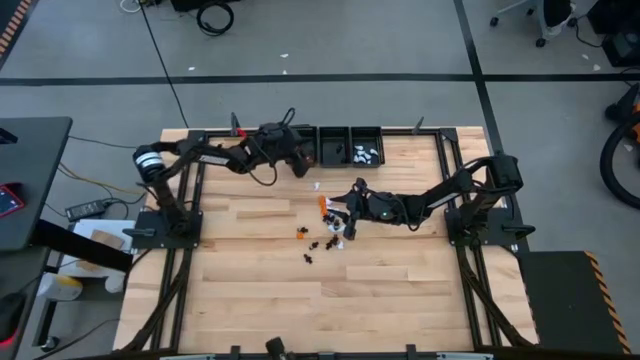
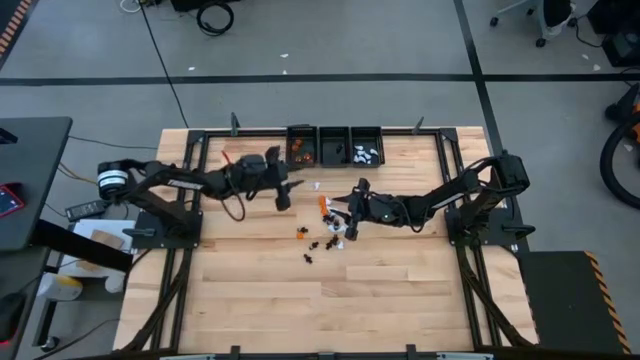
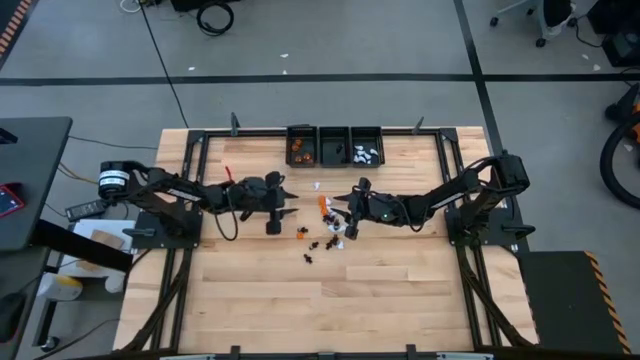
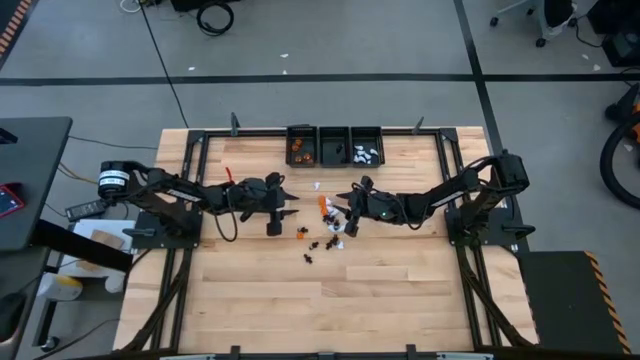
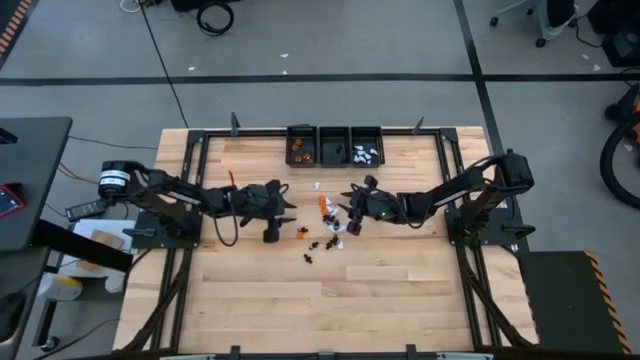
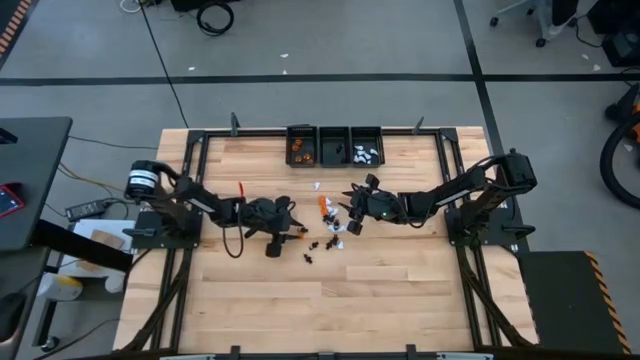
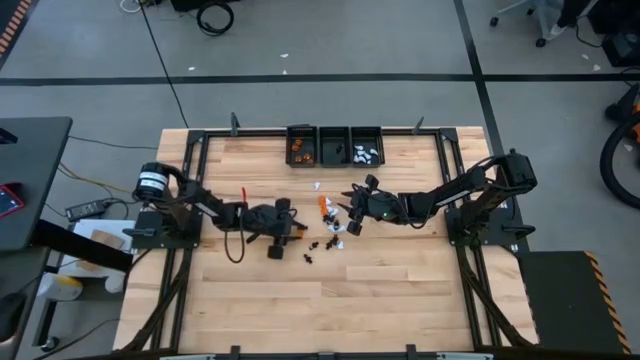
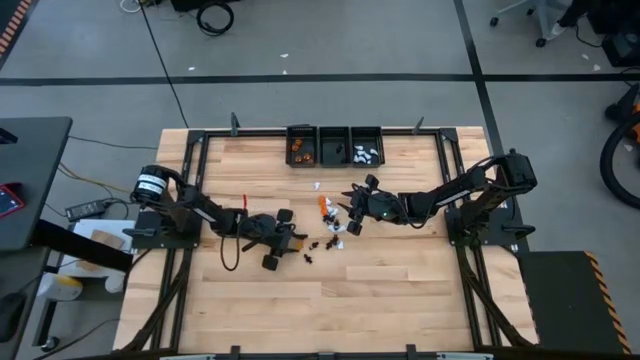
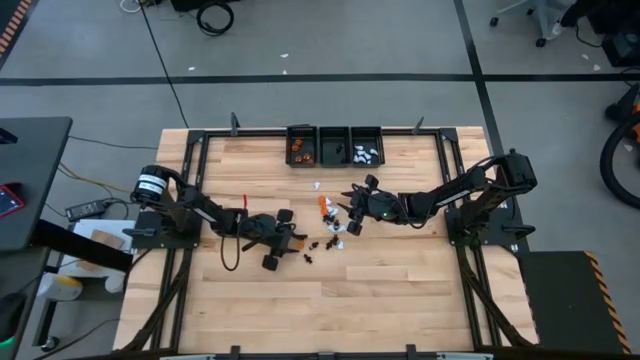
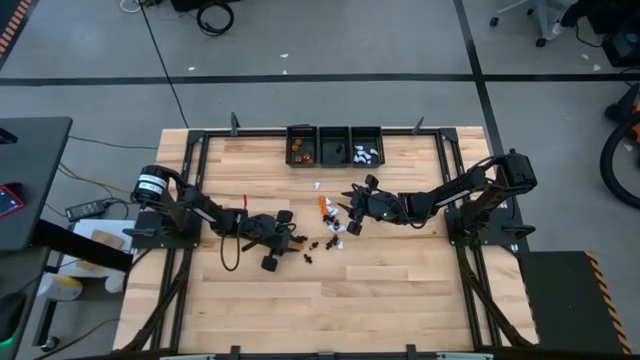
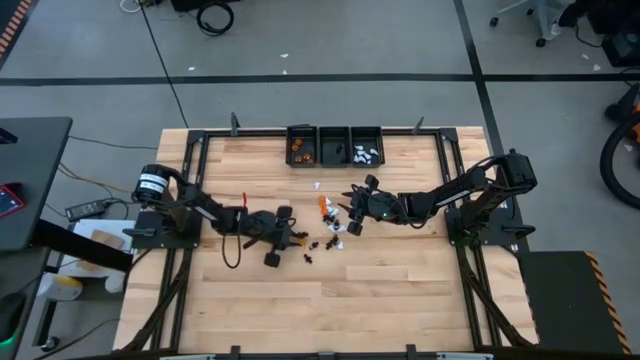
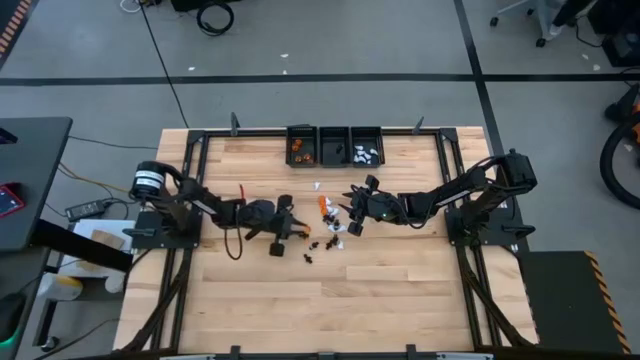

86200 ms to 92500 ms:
Task: Sort game pieces by color
Put the orange game piece into the left black basket

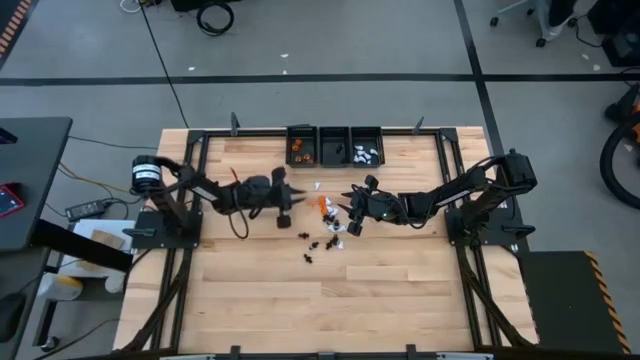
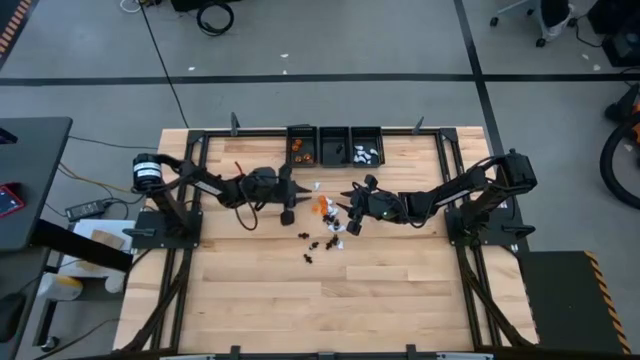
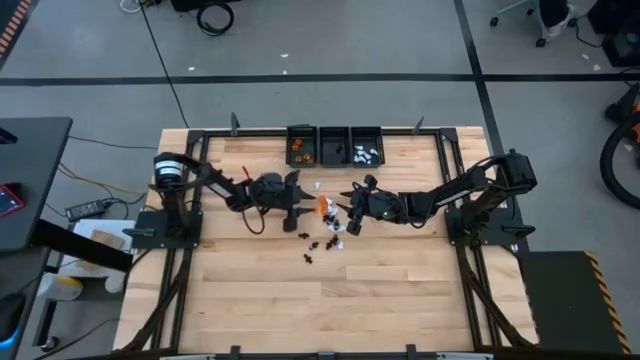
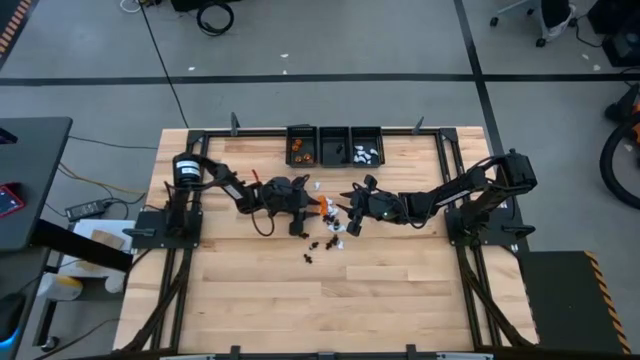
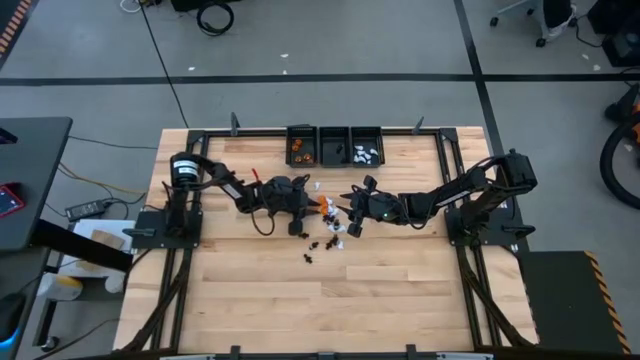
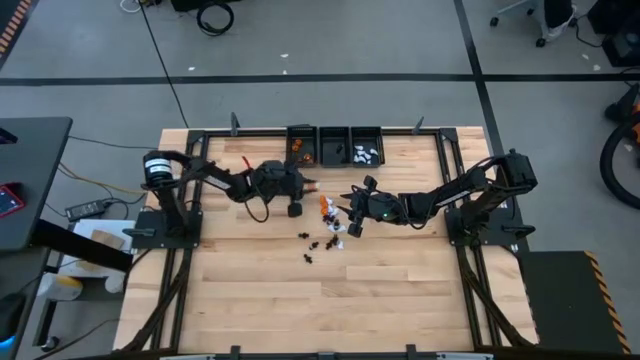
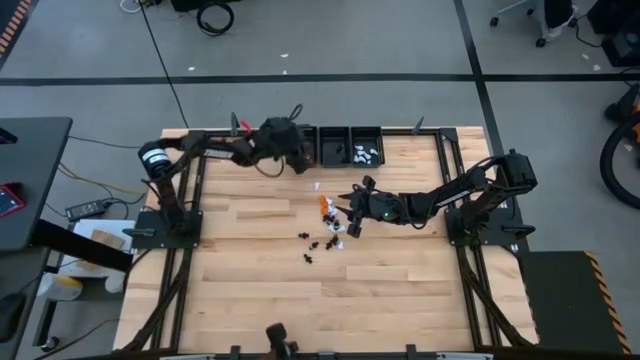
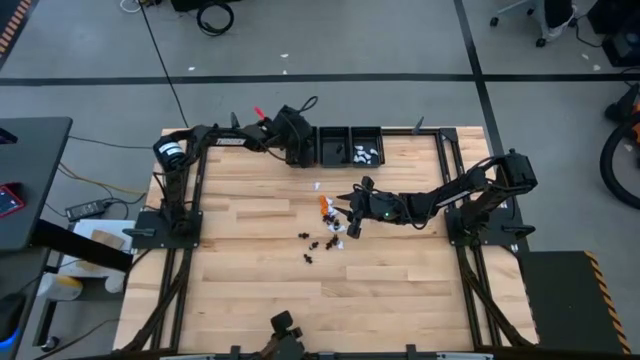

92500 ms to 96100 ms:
Put the orange game piece into the left black basket

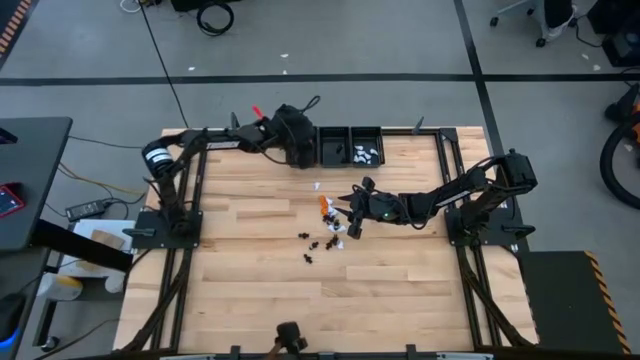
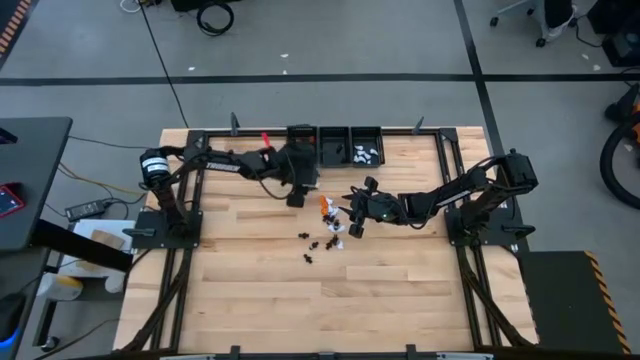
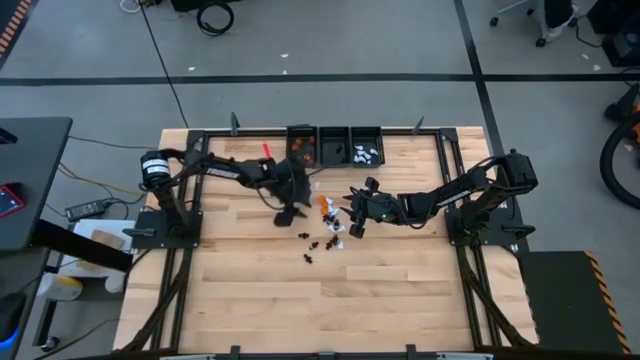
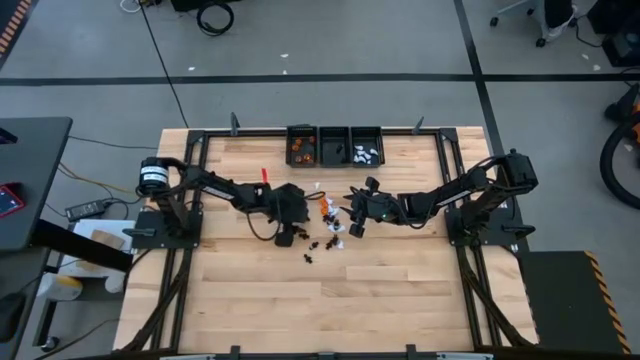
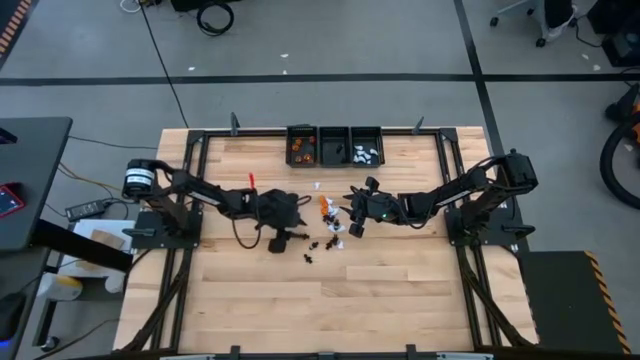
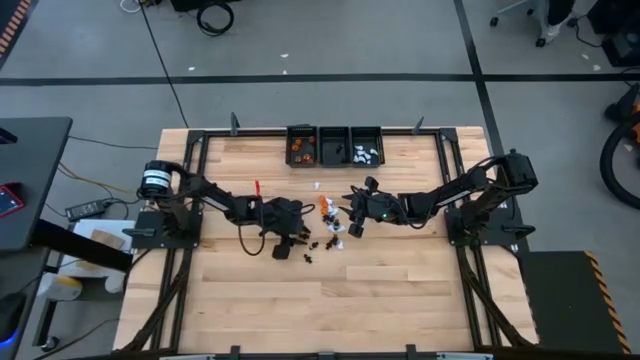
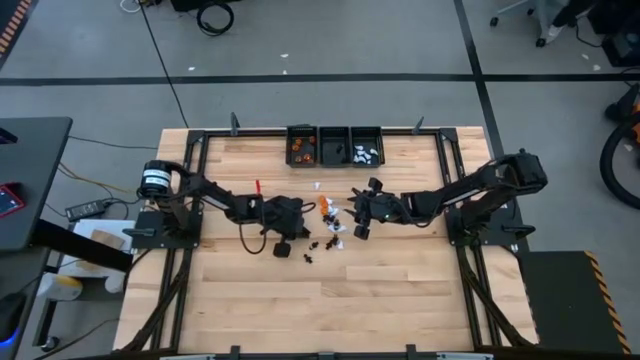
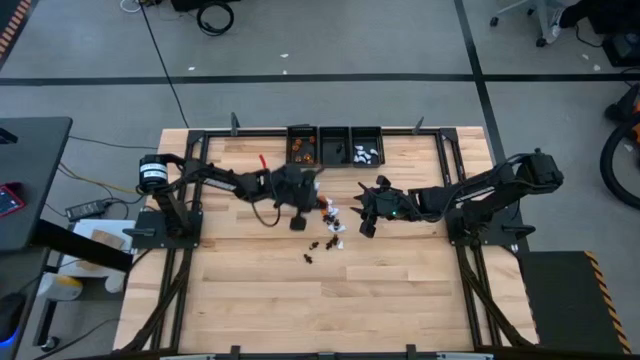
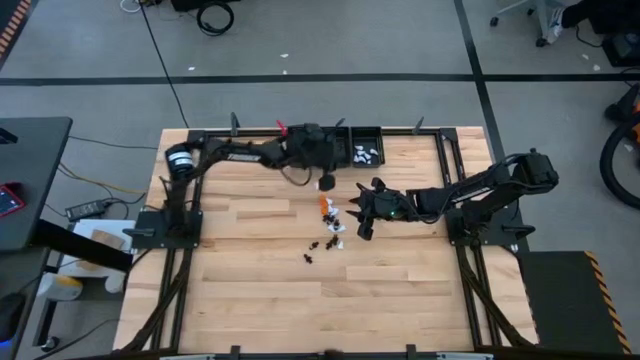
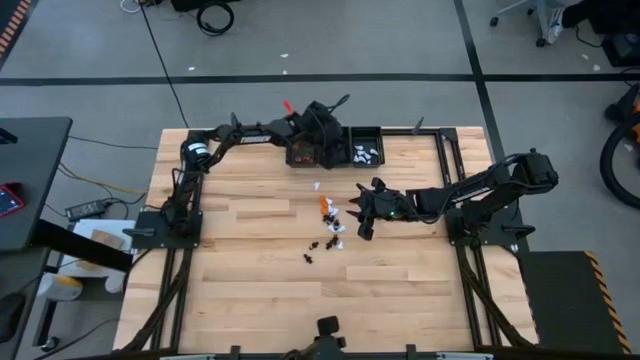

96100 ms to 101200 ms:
Put the black game piece into the center black basket

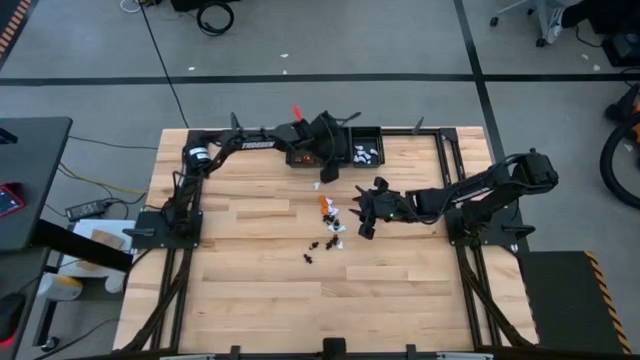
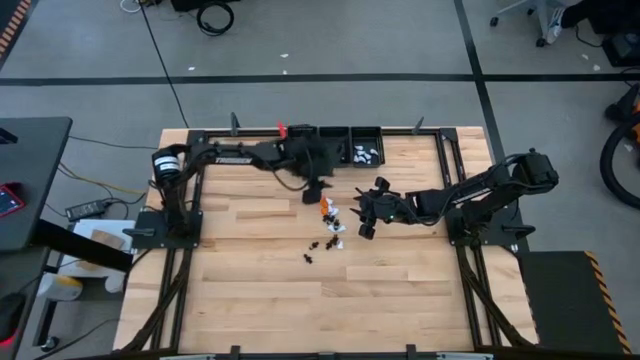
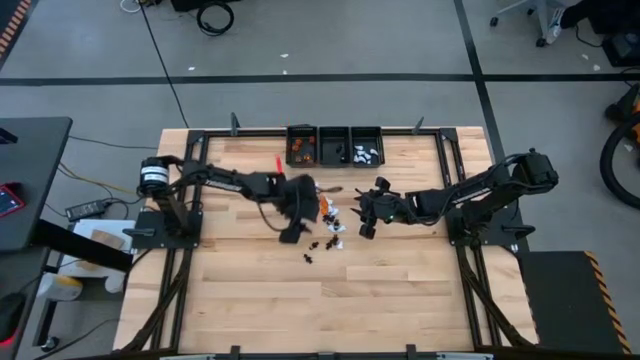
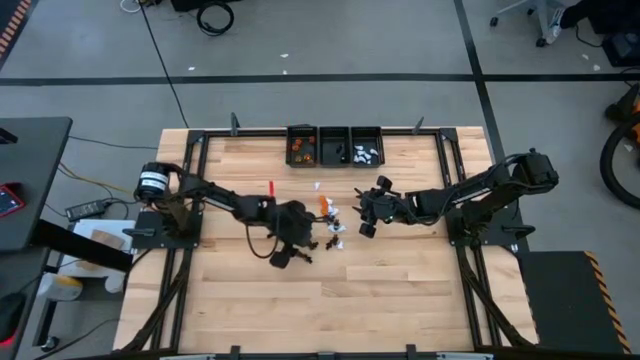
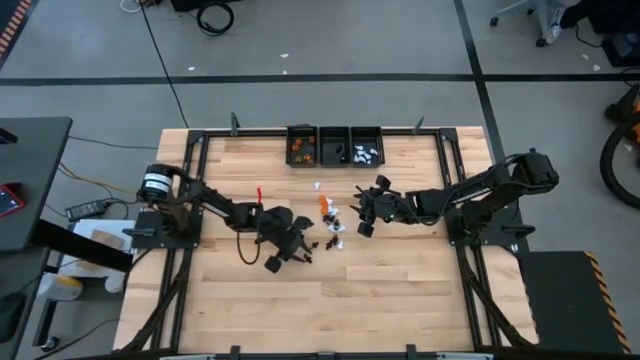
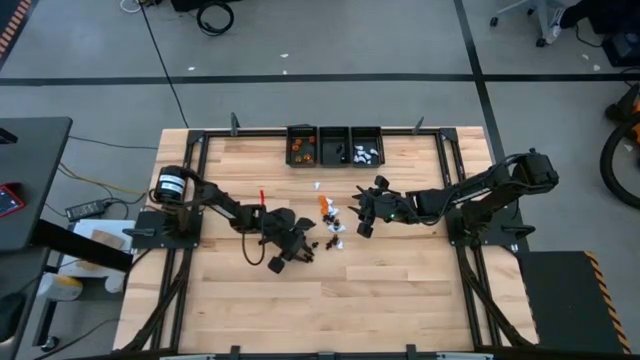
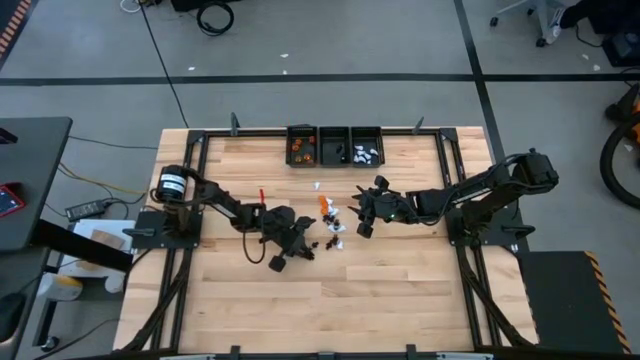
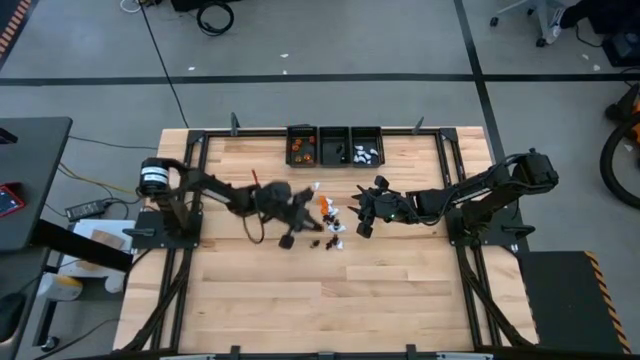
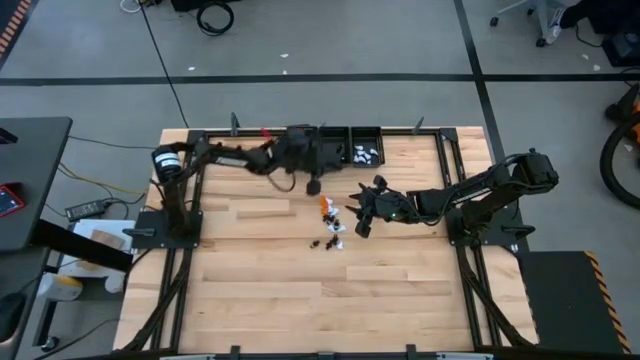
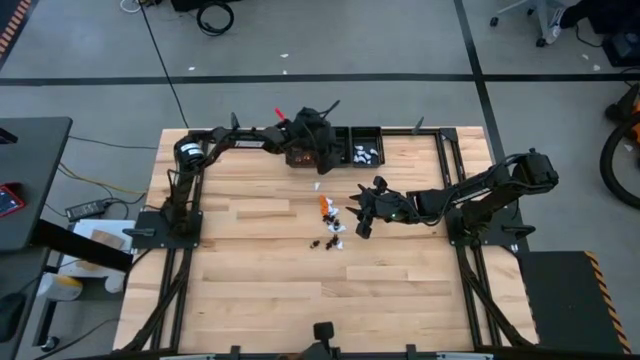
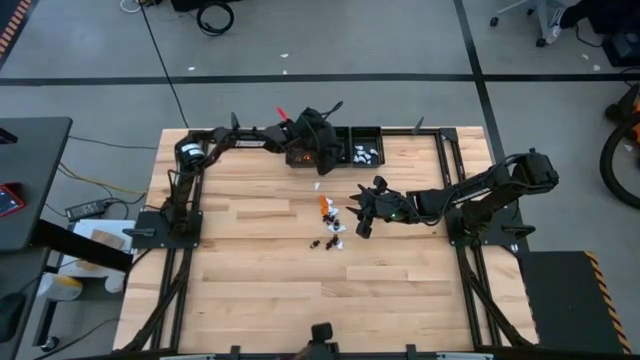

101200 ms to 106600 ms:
Put the black game piece into the center black basket
